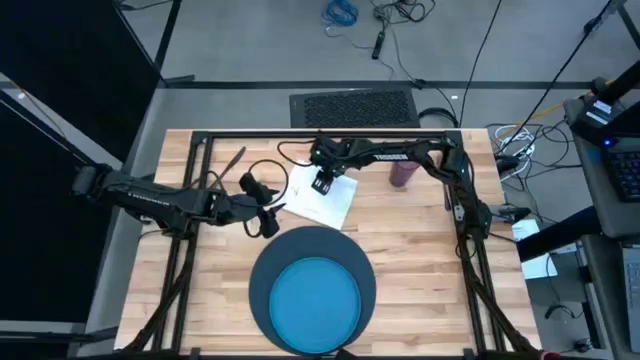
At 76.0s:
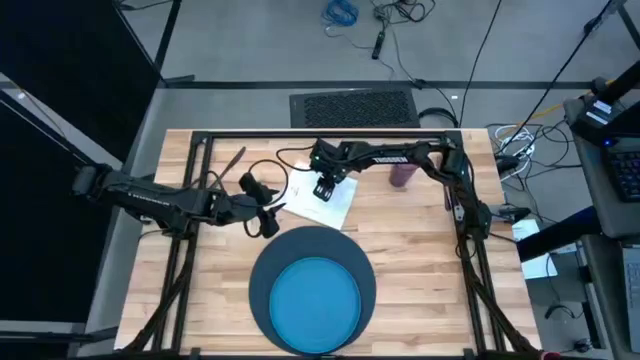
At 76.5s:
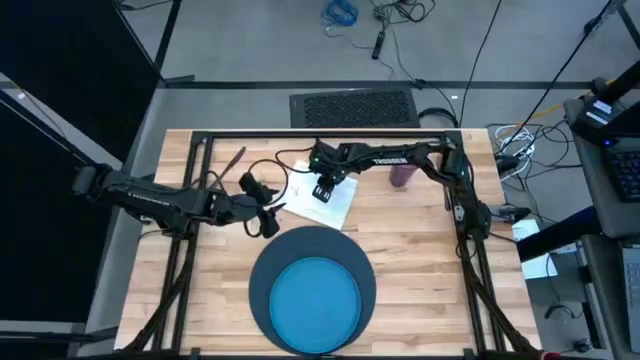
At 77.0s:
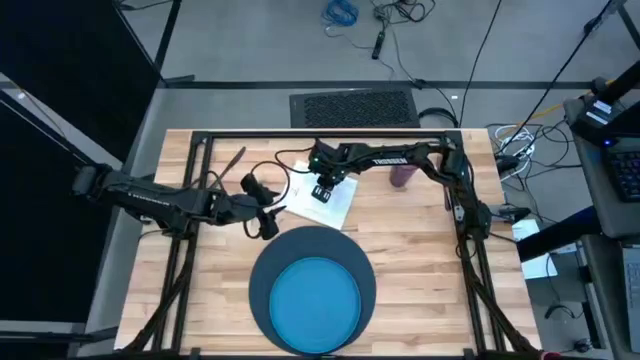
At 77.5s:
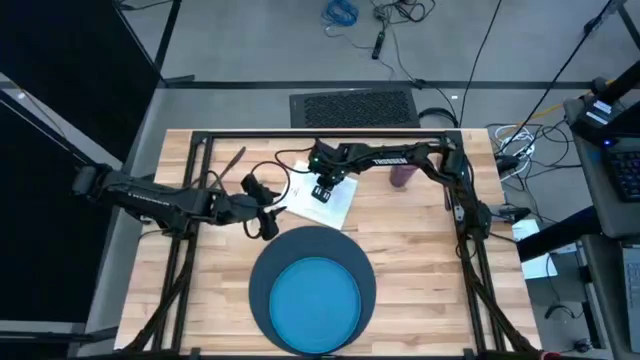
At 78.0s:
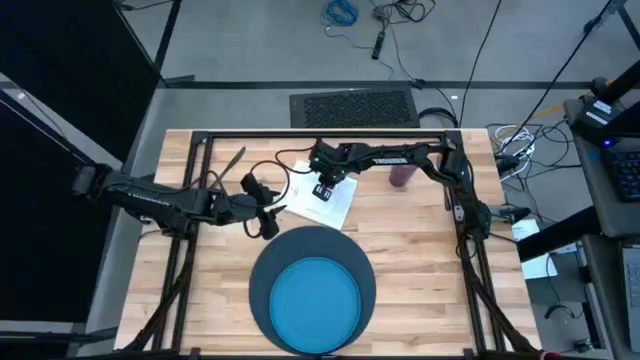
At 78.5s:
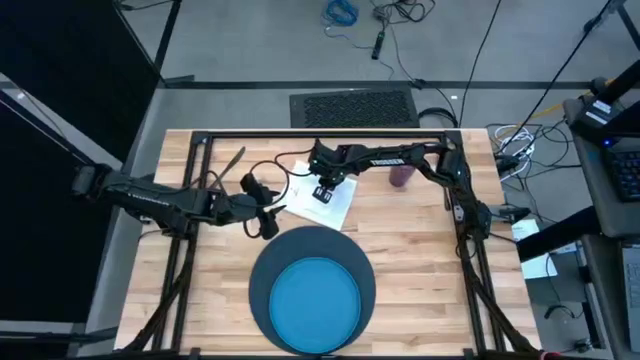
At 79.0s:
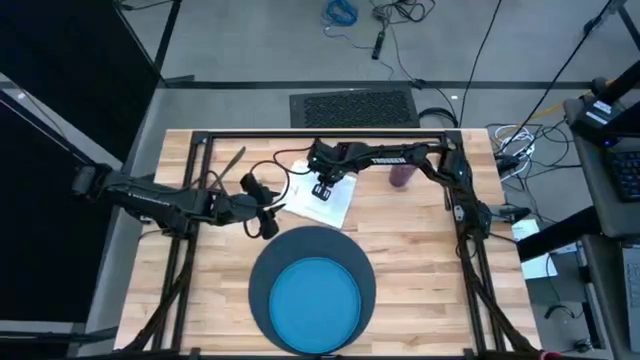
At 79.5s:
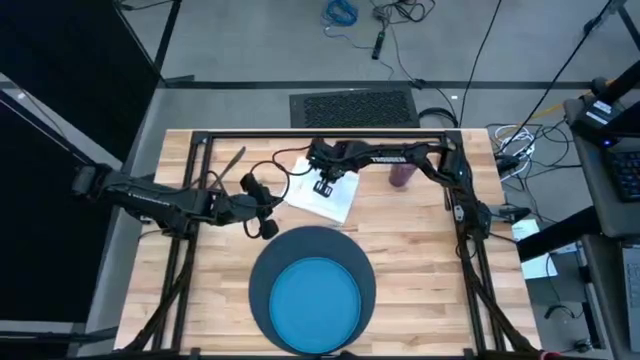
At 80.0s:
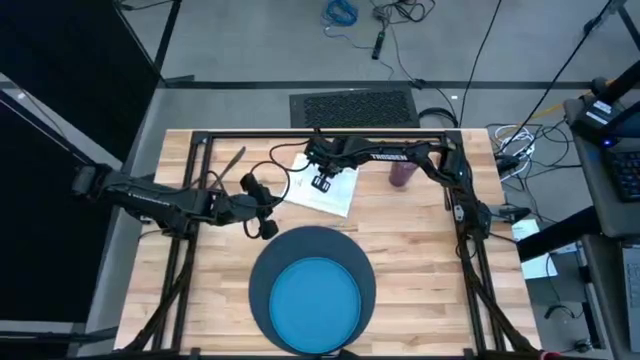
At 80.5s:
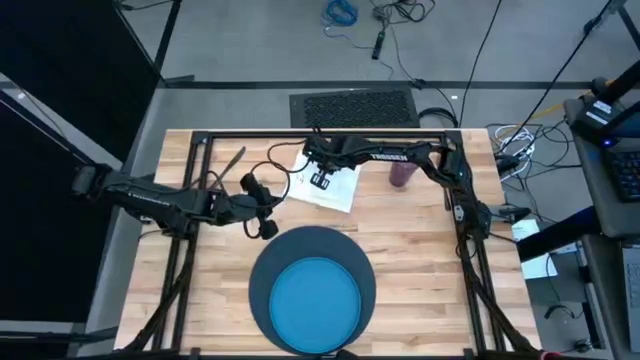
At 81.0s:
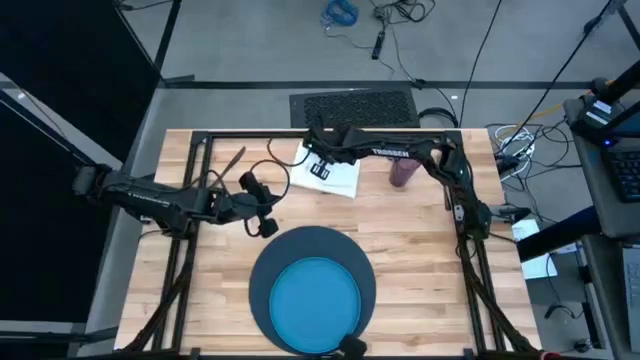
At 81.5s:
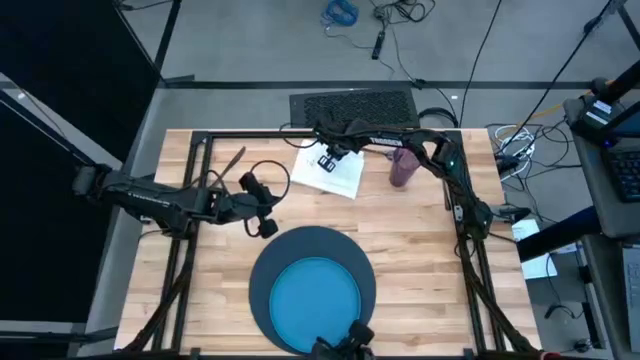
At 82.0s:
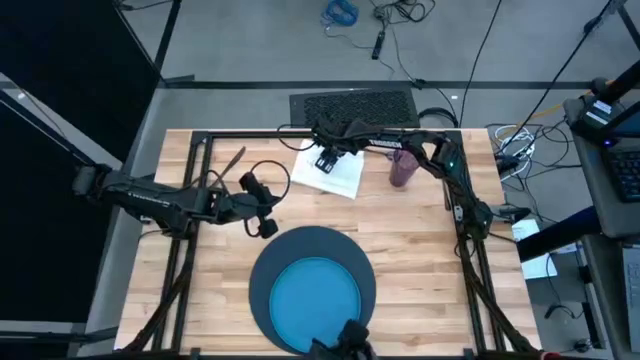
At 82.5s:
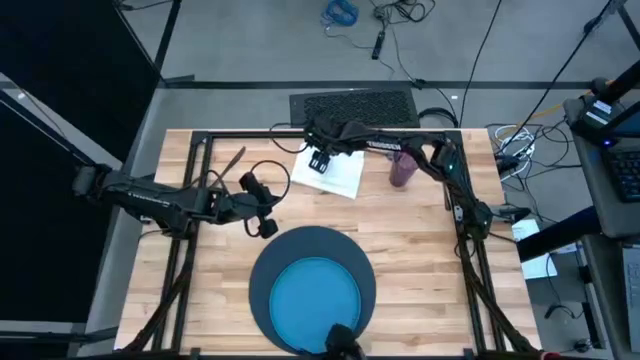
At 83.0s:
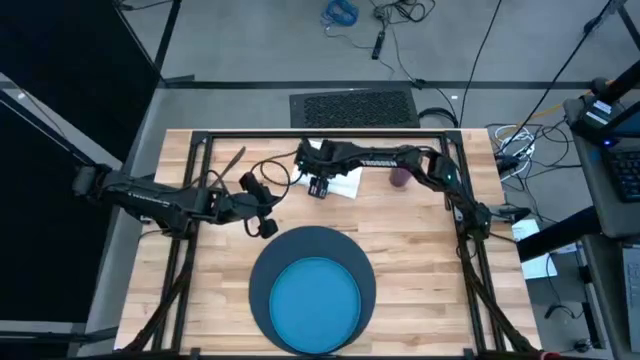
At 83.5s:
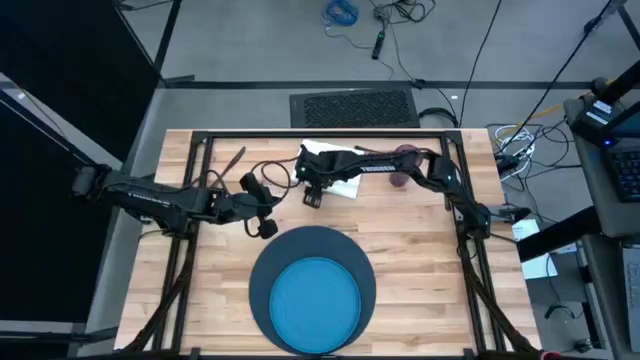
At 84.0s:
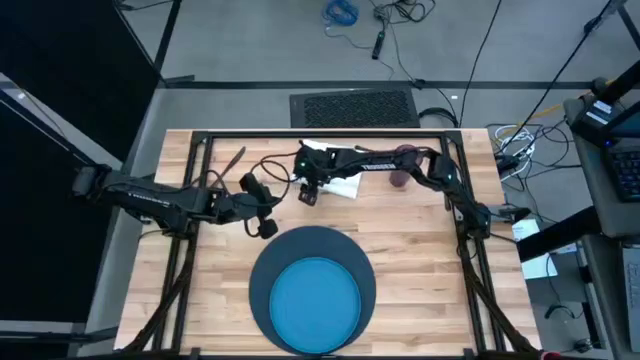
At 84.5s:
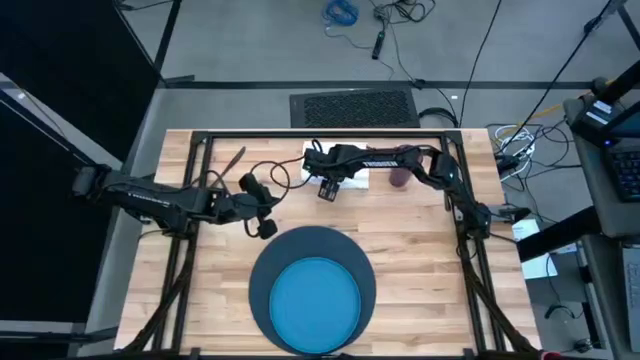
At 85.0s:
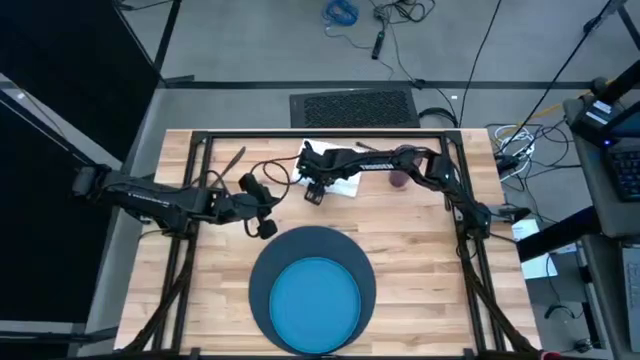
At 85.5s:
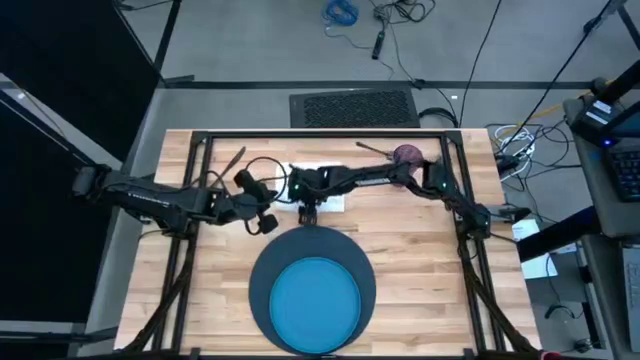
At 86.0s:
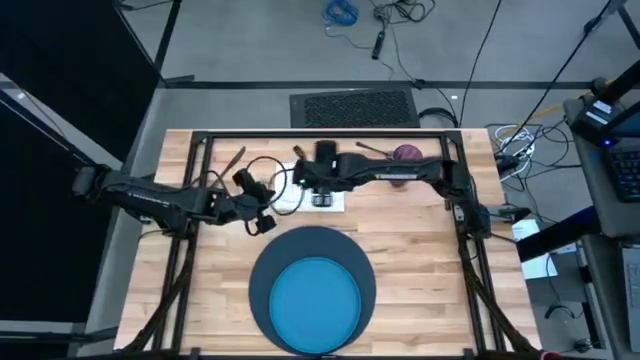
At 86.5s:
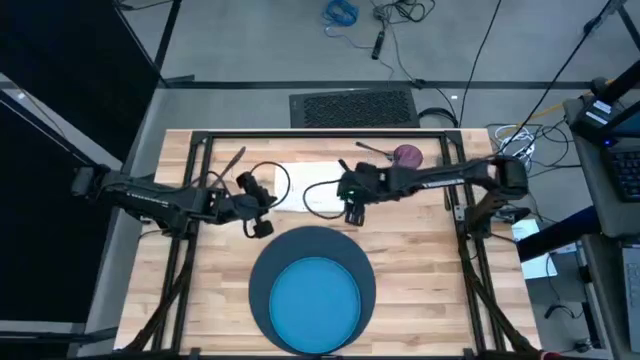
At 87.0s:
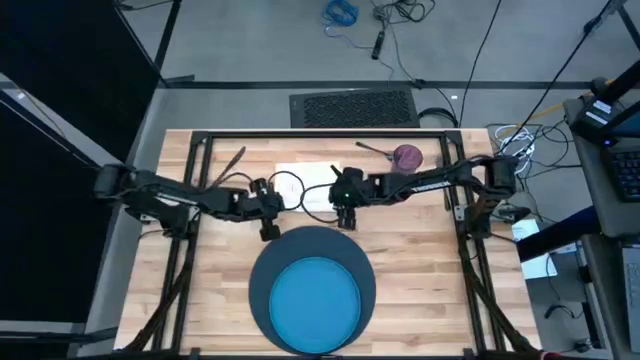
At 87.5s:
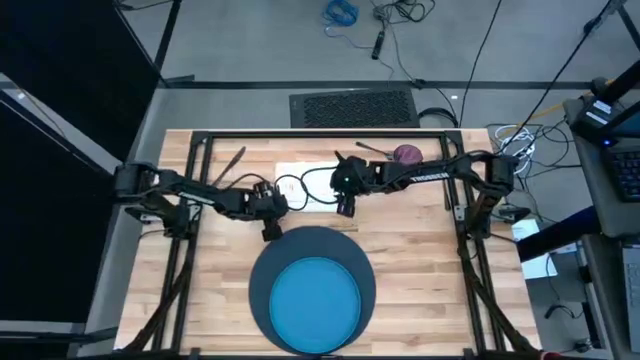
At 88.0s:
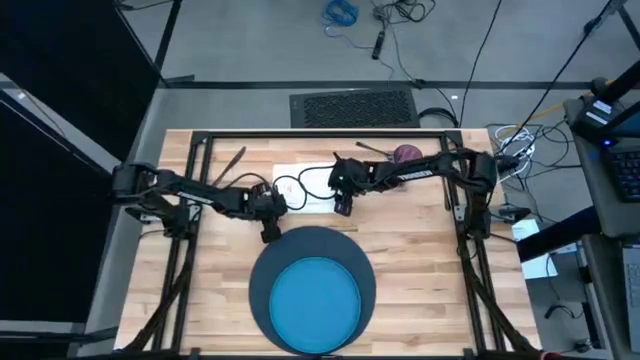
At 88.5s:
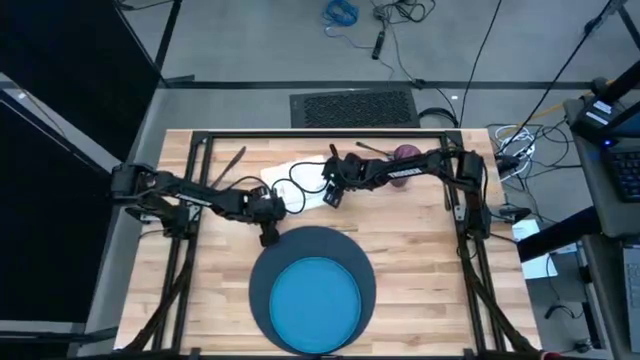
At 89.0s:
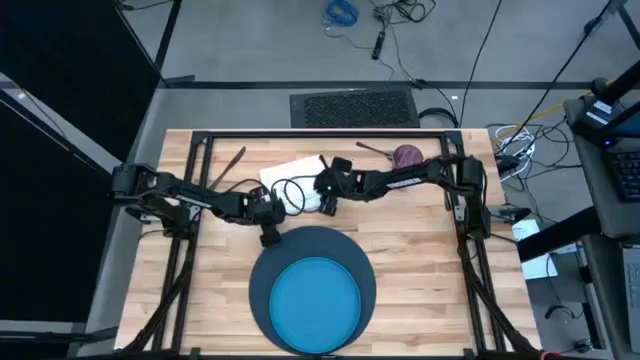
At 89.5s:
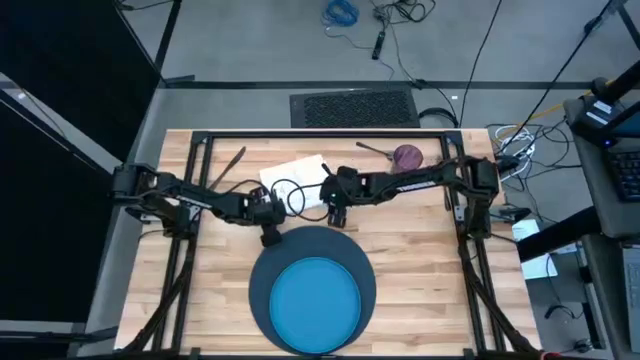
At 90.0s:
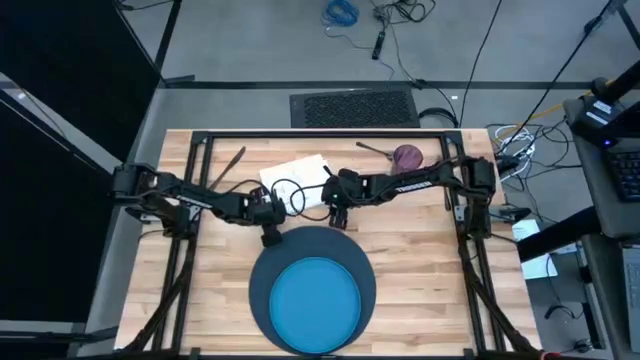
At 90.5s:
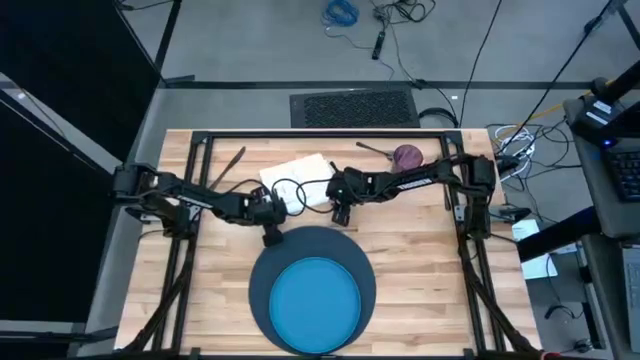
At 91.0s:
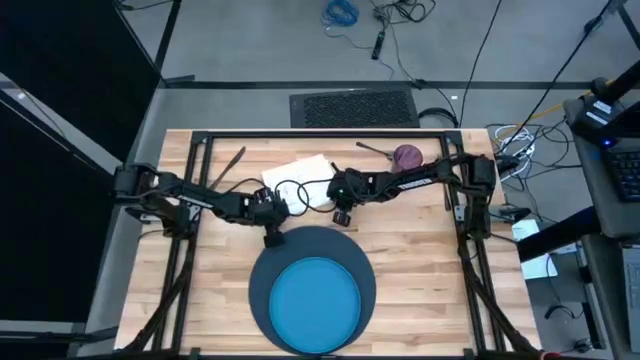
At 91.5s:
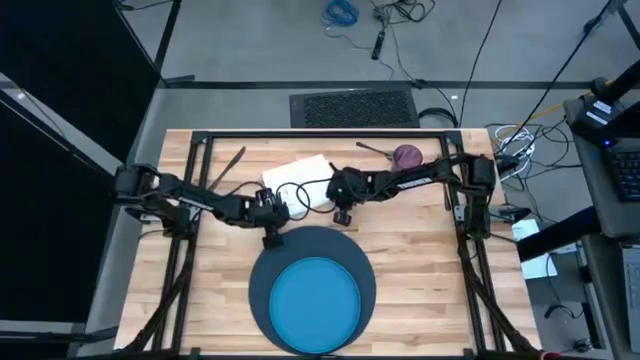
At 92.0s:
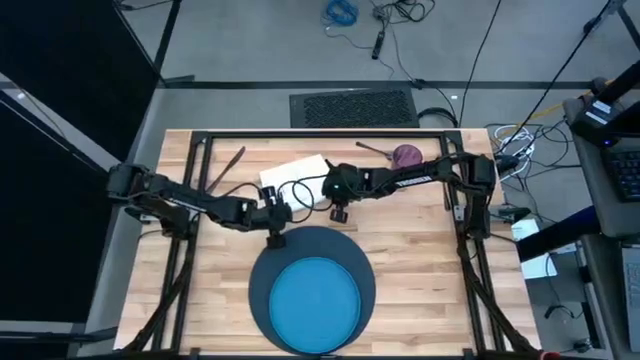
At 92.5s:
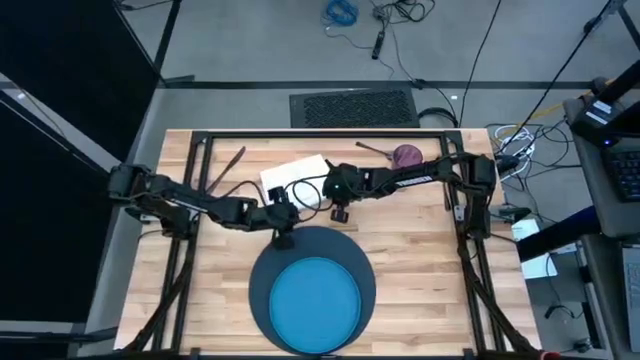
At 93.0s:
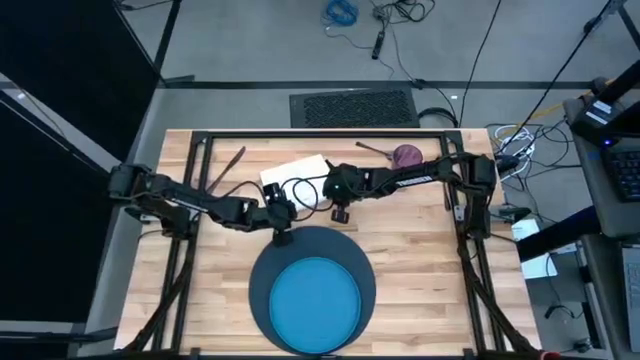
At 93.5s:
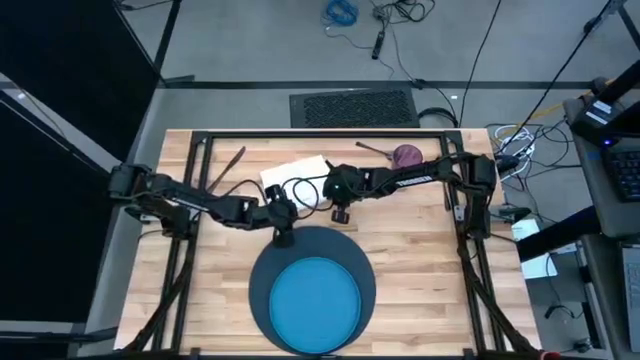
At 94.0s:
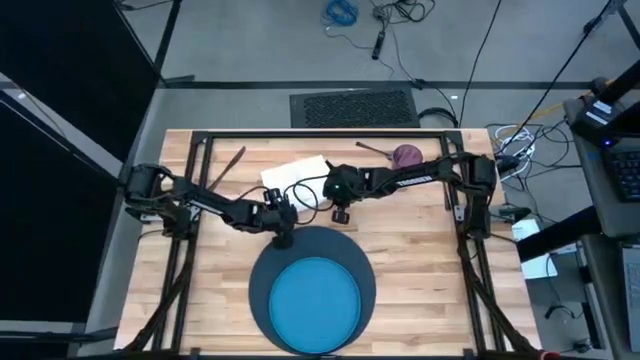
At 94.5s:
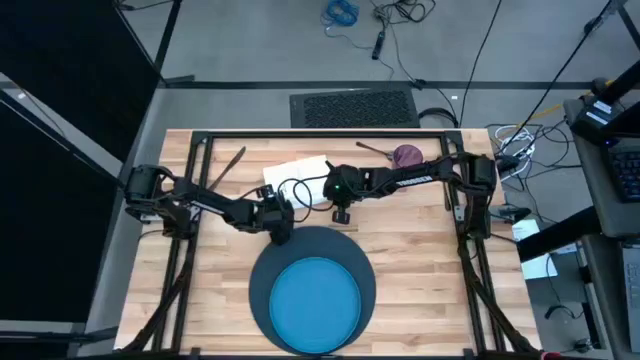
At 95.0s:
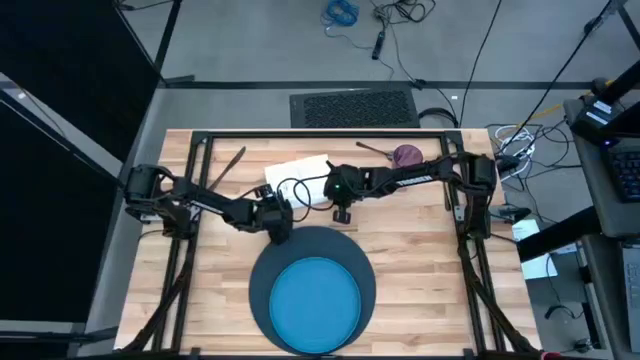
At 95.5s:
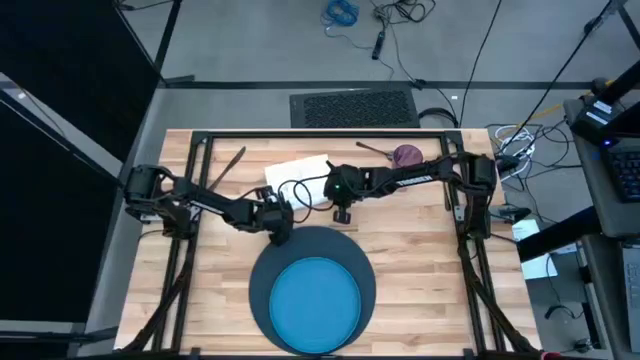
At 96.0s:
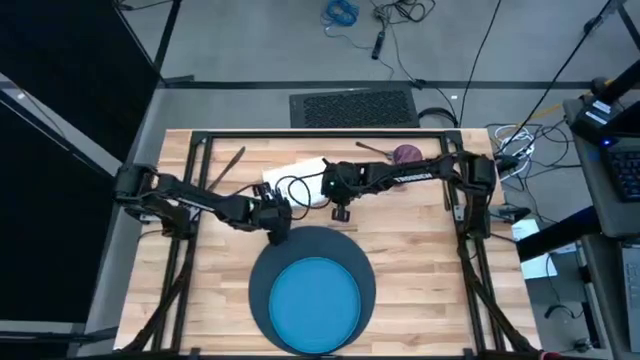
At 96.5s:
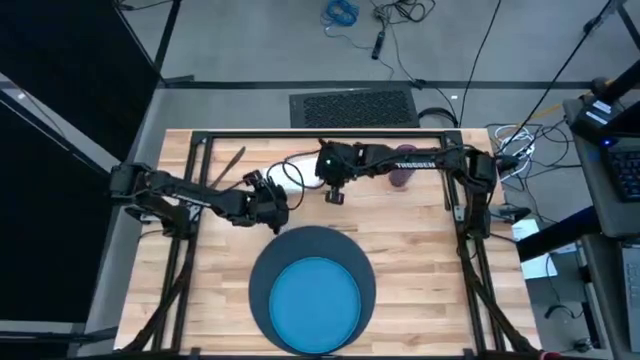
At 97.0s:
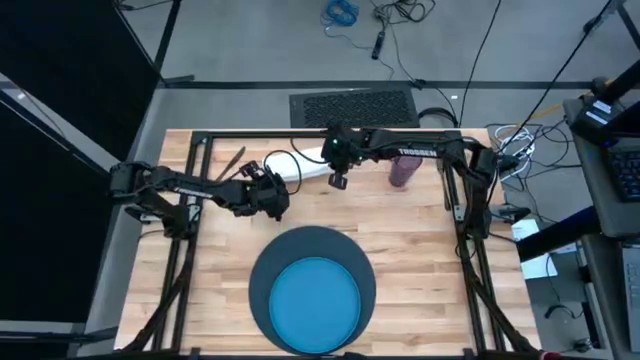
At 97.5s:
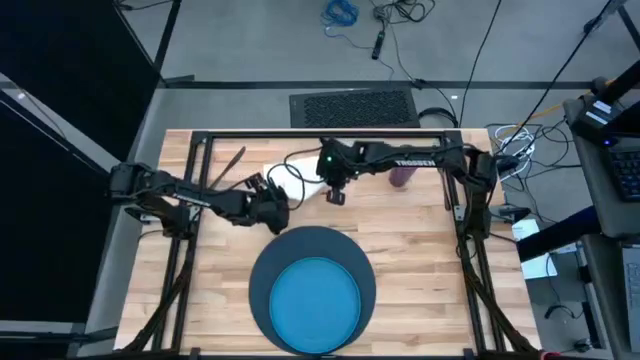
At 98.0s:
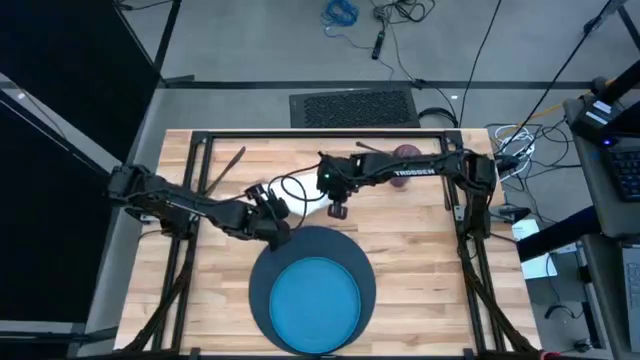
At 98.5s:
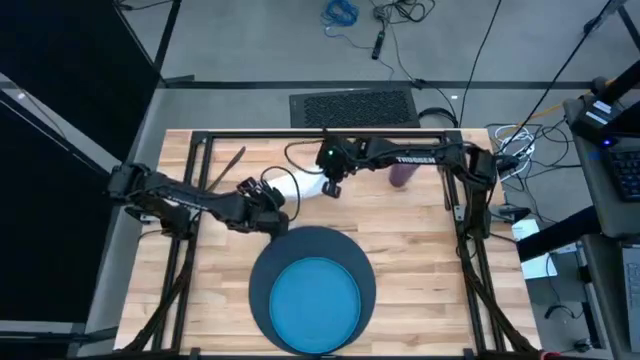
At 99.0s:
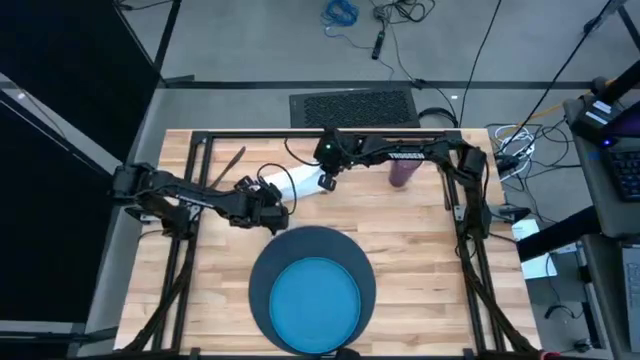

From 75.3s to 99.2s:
Task: Set table place
Fold the white napkin
